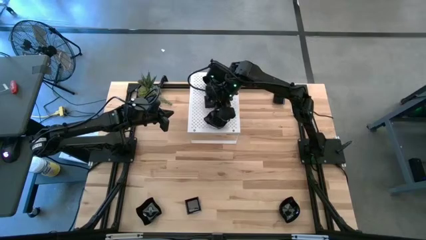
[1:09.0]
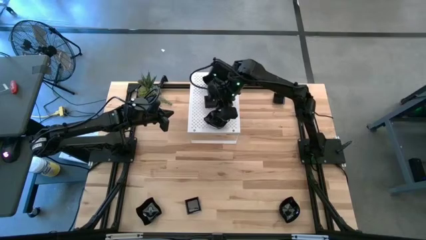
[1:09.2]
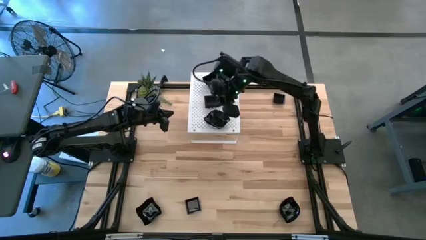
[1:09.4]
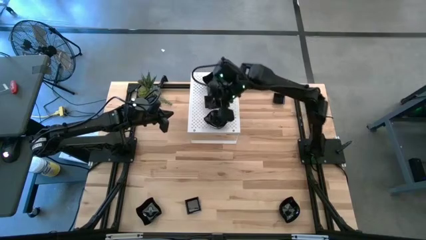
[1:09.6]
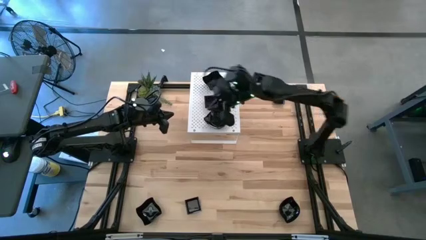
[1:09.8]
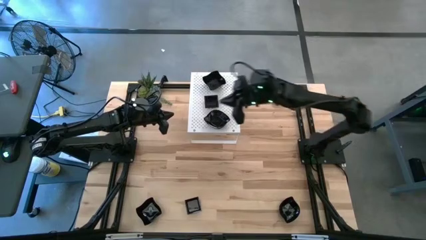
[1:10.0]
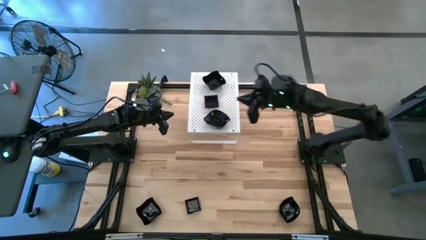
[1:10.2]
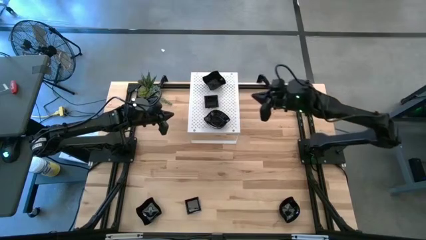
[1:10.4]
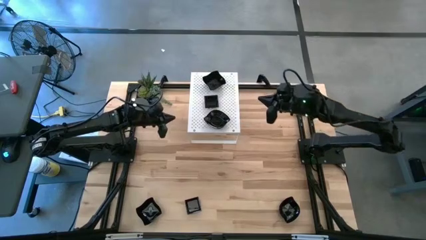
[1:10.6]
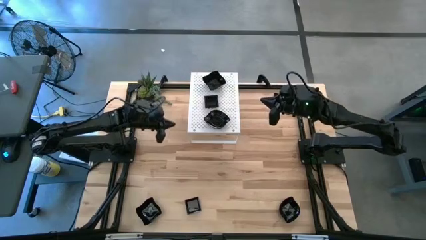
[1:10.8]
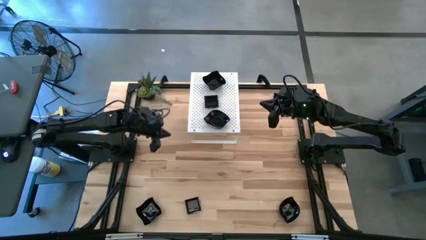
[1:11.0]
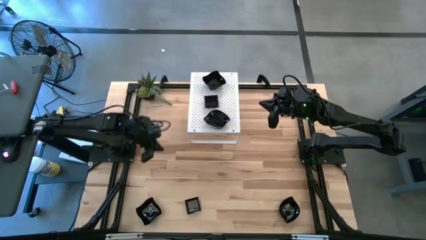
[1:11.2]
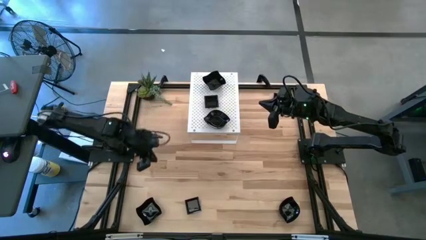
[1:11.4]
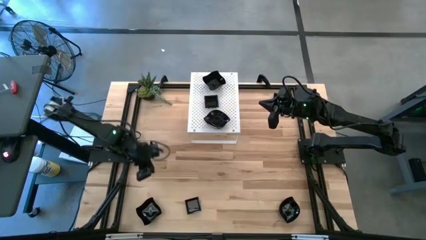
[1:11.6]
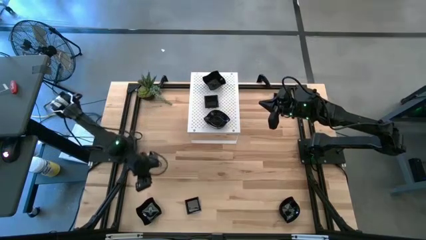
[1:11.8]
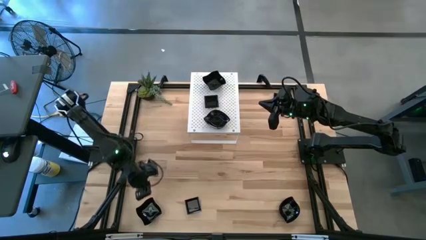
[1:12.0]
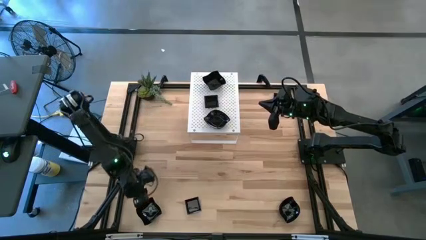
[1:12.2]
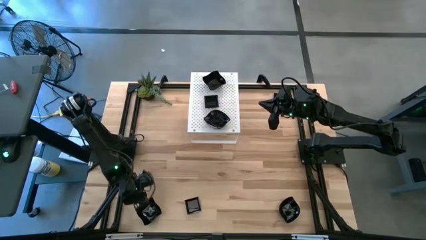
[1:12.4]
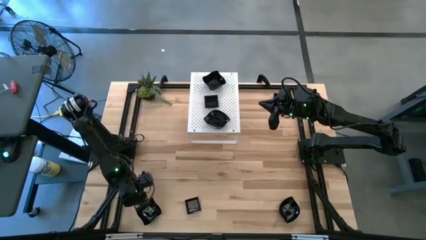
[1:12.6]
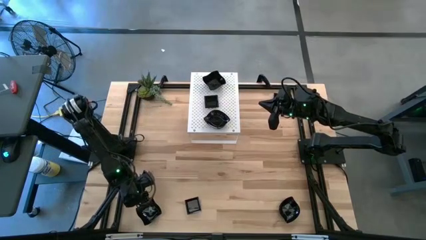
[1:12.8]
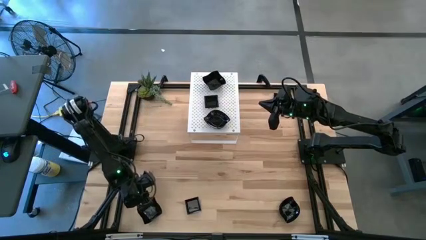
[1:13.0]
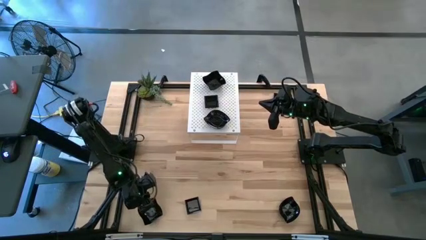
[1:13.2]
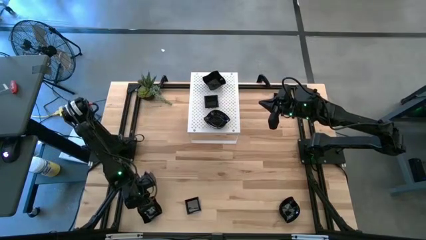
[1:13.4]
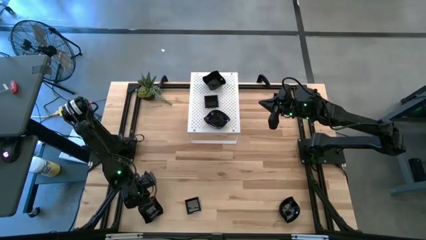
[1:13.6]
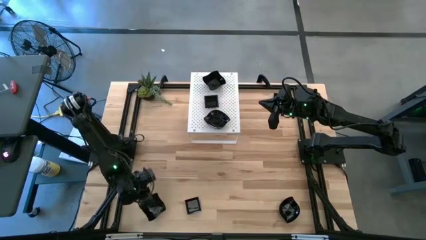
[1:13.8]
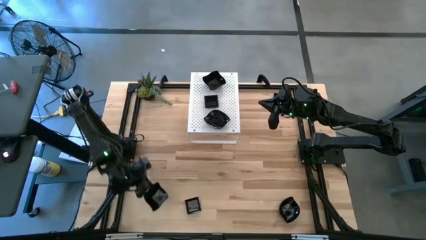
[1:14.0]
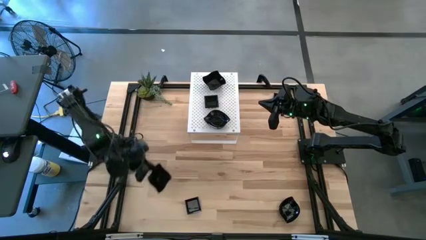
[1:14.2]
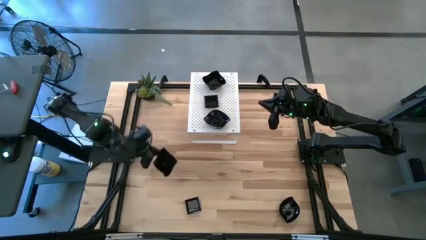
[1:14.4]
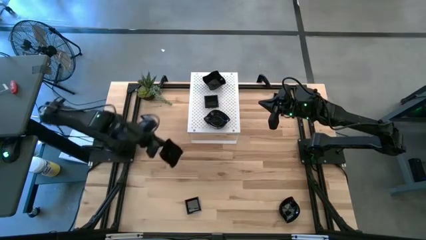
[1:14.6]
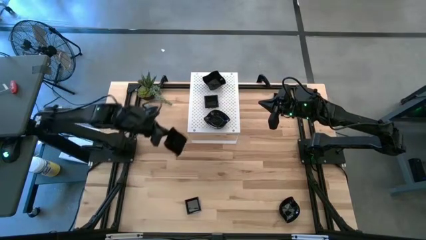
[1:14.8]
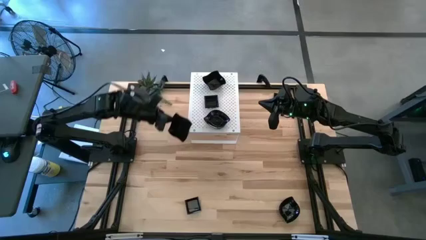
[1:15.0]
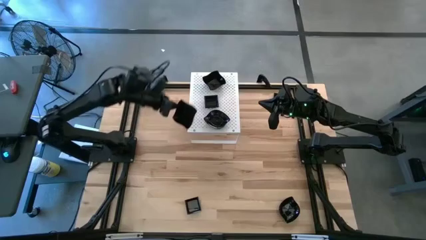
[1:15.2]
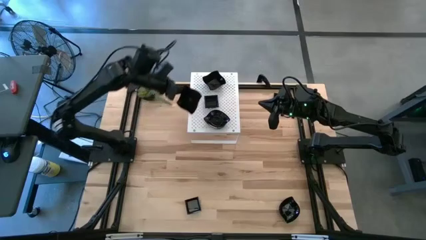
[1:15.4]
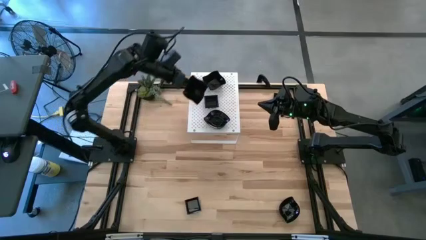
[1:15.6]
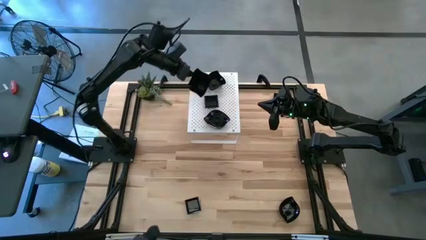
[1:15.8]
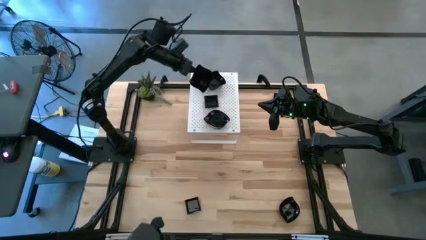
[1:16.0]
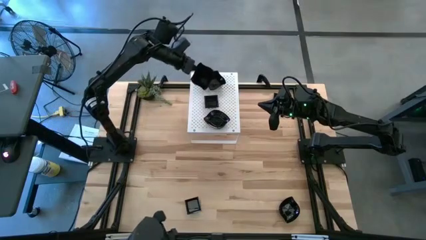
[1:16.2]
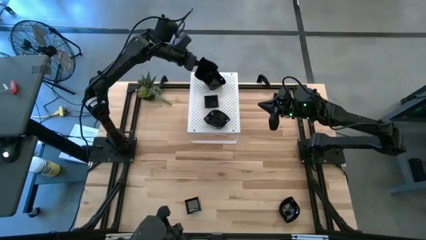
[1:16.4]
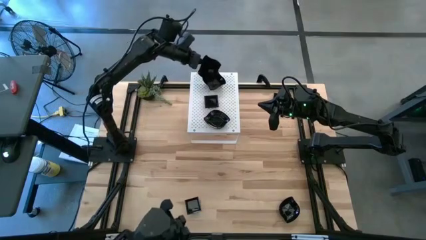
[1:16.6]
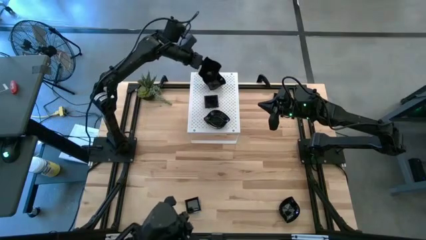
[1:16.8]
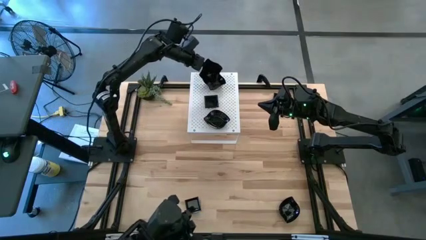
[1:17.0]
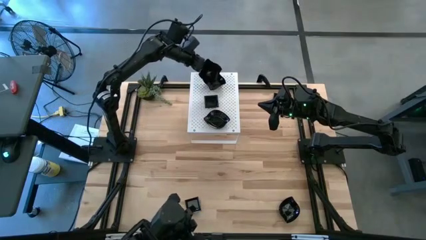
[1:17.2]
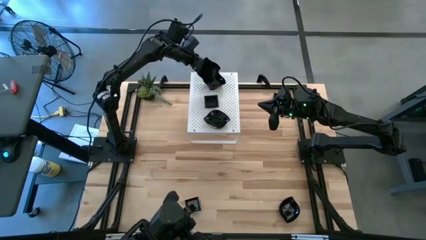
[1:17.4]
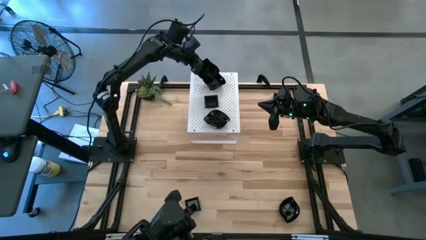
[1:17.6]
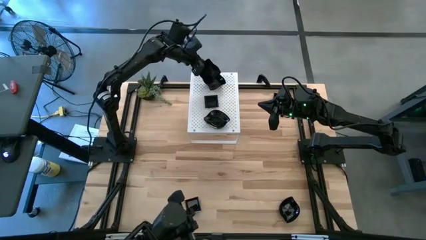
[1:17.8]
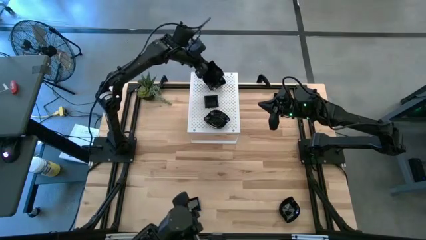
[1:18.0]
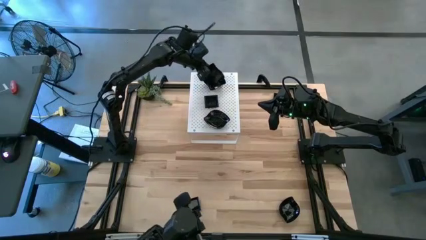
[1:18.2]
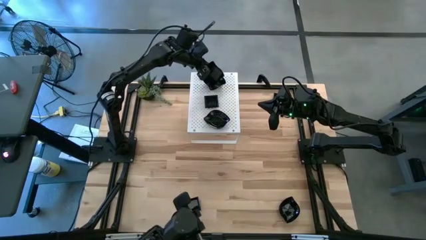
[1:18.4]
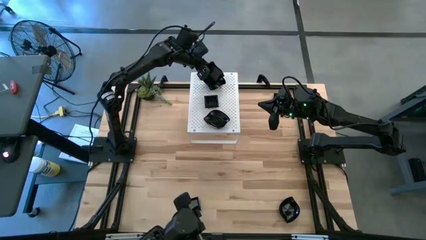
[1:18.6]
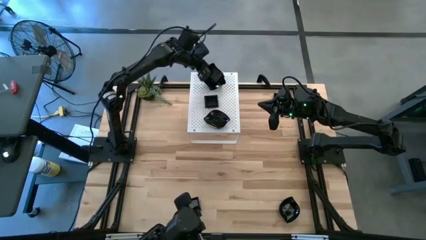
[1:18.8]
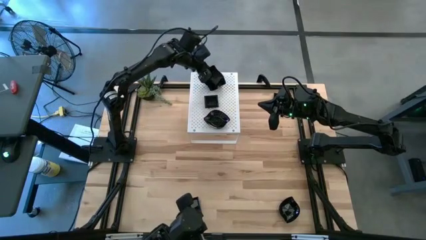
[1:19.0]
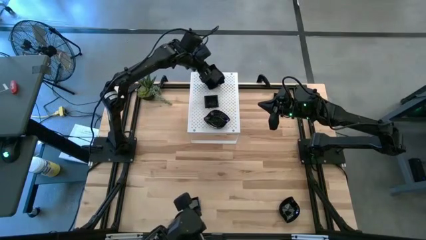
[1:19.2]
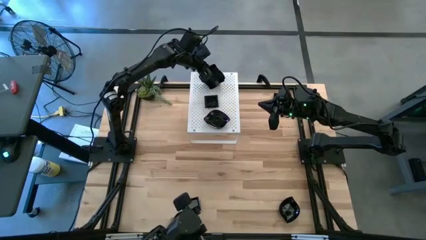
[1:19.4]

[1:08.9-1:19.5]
Task: Pick & Place Mini shaped plates
Stack the black distorted square plate on top of the black distorted square plate on the shelf

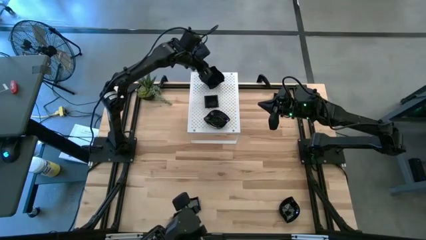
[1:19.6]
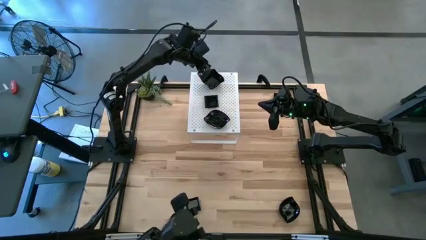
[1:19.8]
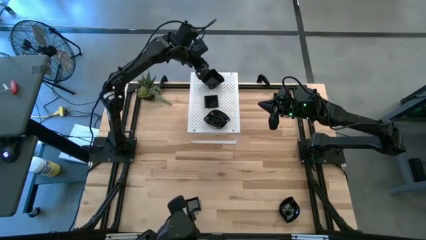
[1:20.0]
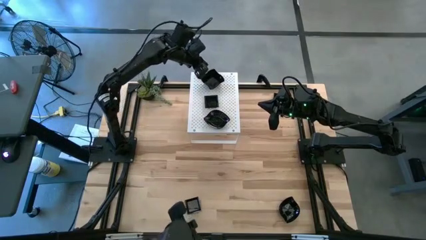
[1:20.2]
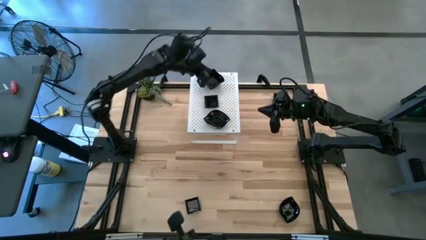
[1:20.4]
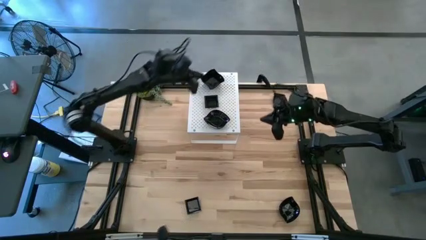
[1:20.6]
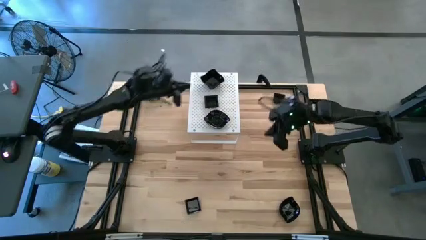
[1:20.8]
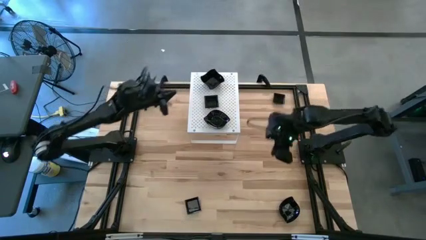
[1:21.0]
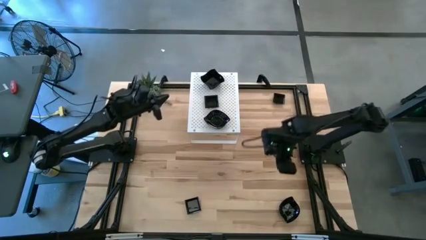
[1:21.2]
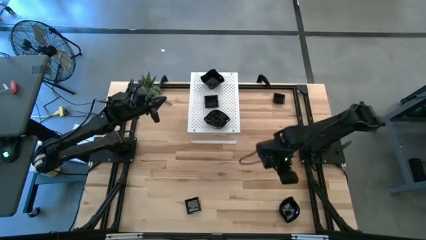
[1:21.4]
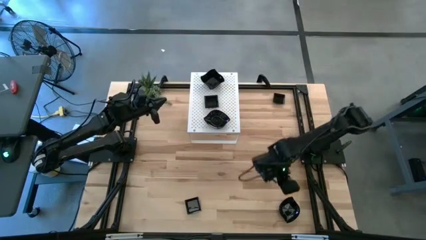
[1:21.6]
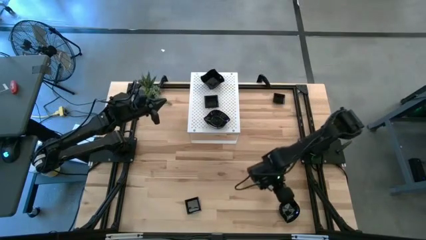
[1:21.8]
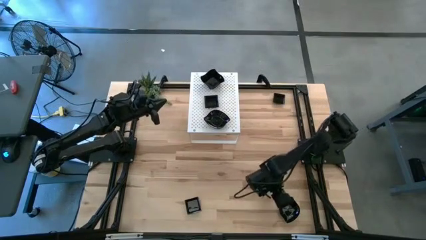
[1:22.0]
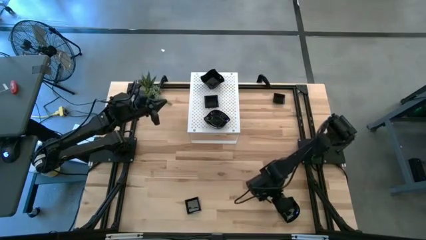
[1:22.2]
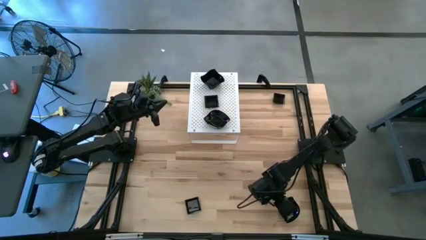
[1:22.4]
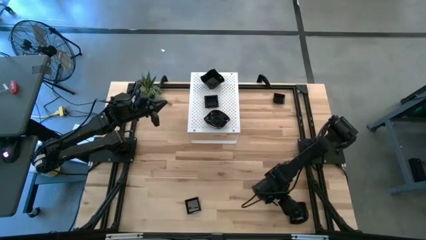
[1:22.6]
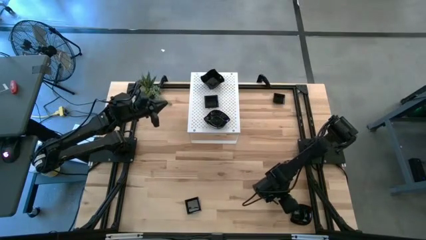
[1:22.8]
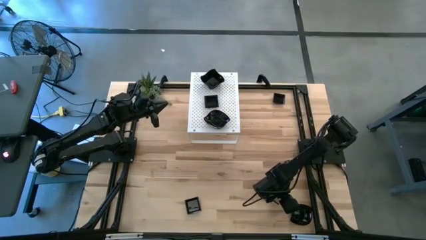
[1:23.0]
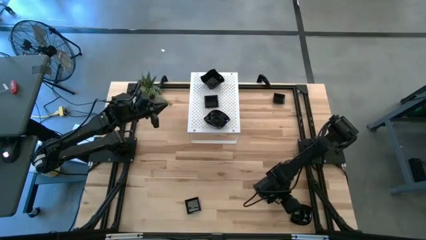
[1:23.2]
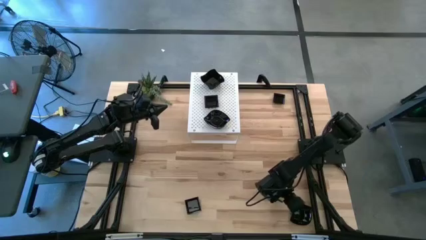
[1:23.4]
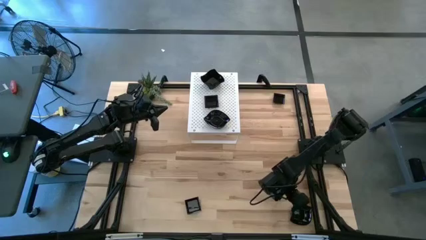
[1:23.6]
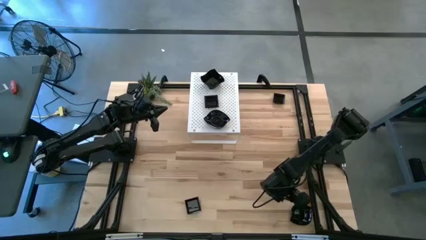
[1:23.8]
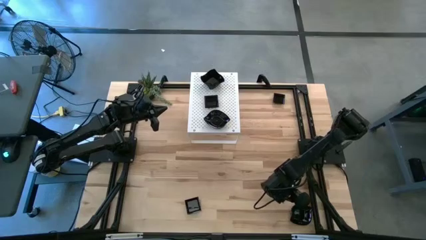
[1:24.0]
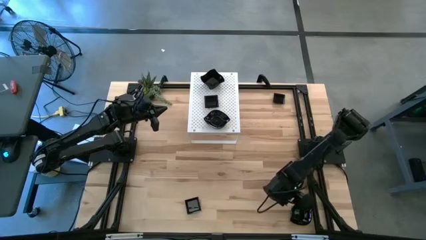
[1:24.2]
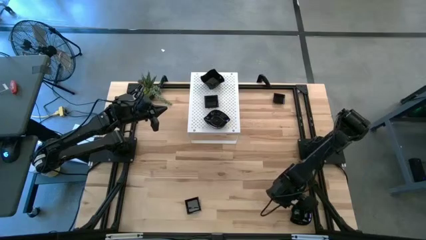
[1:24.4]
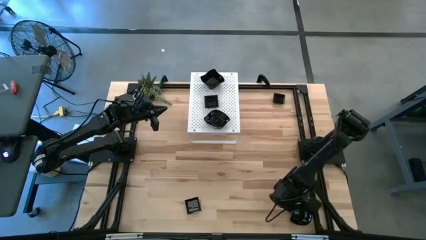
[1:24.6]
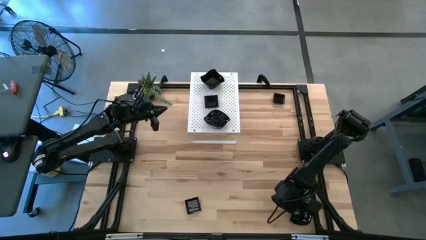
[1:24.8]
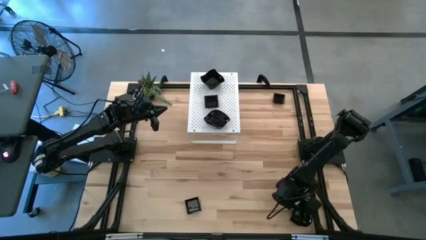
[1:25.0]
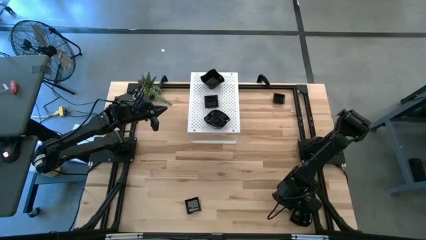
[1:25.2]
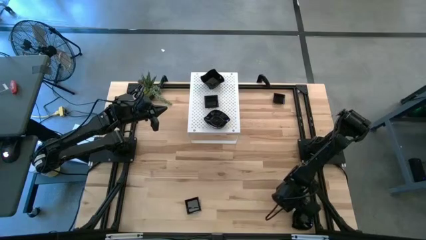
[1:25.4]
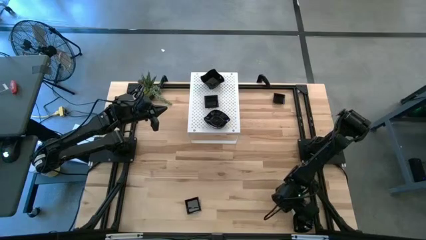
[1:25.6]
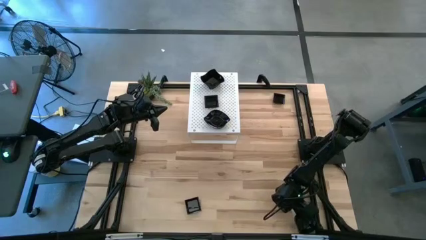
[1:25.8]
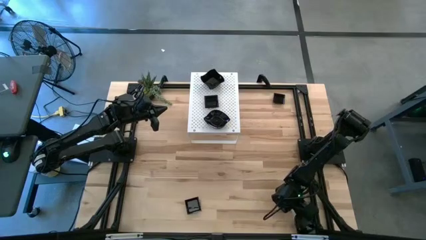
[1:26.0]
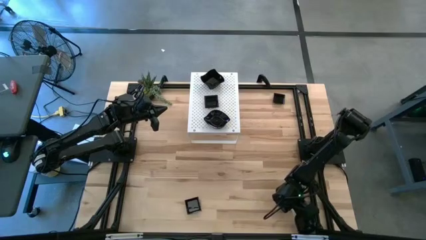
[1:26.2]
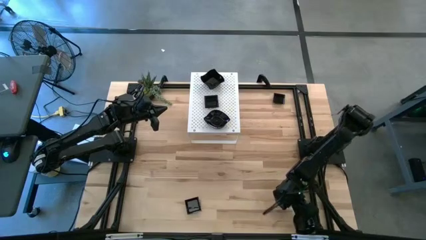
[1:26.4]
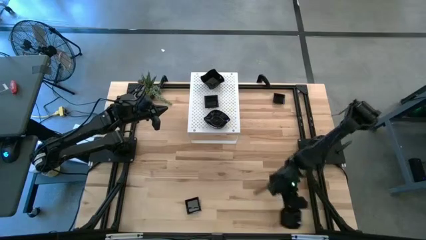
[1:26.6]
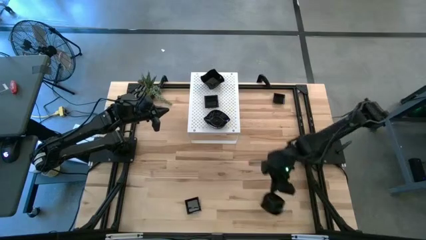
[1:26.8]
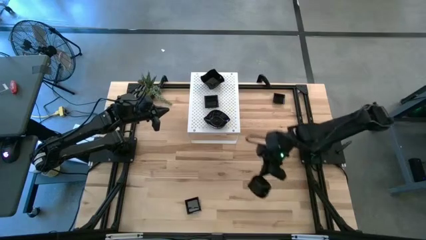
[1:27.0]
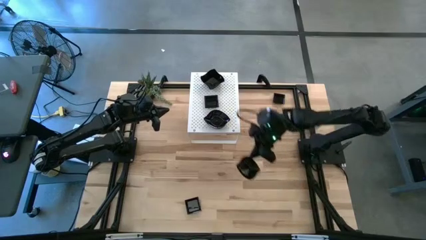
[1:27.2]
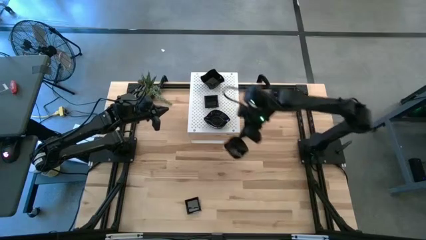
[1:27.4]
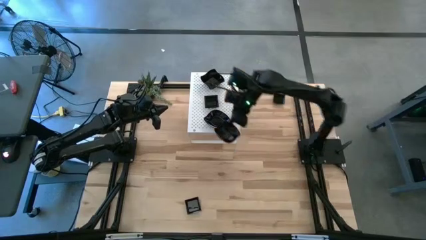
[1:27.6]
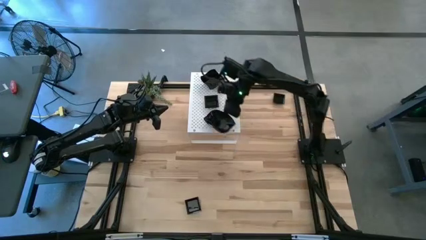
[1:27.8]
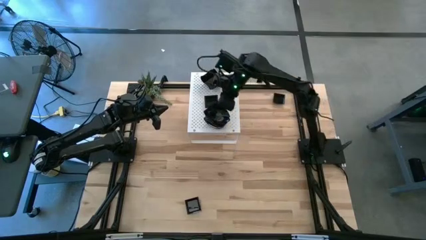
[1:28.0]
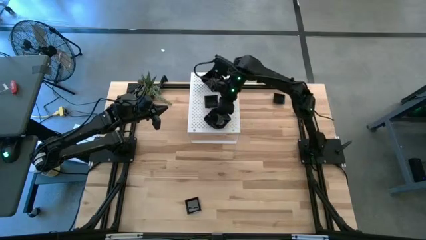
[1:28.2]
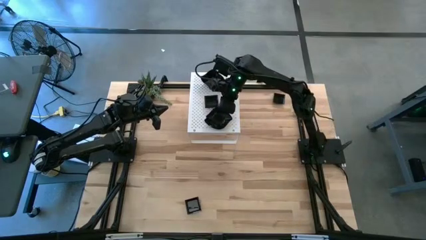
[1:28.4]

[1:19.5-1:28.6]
Stack the black leaf-shaped plate on top of the leaf-shaped plate on the shelf
